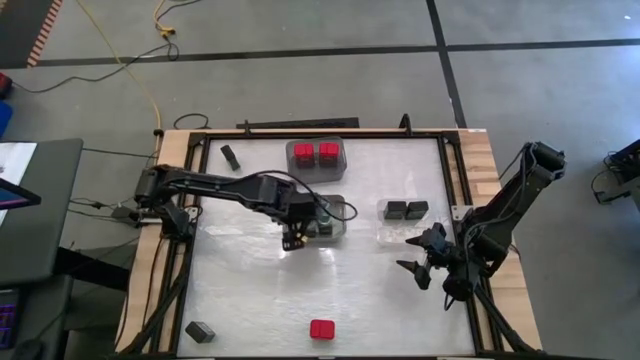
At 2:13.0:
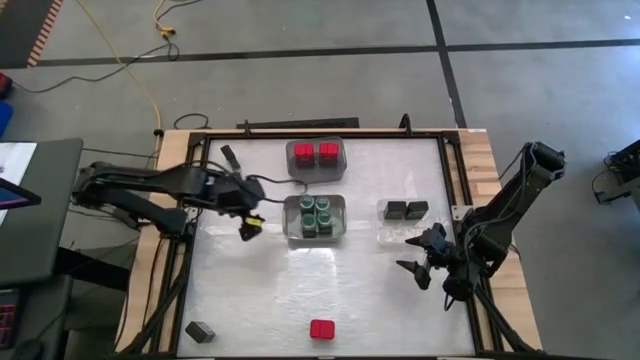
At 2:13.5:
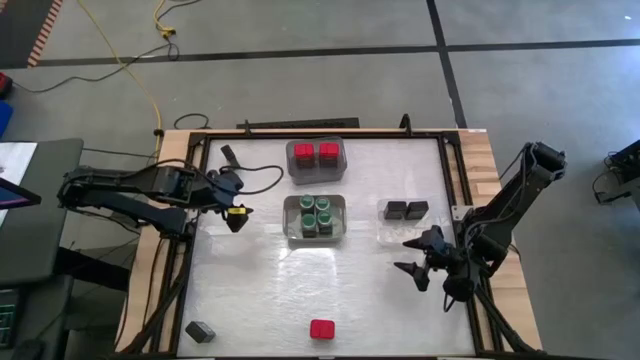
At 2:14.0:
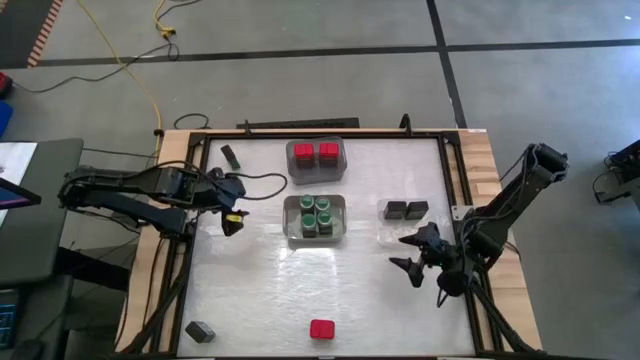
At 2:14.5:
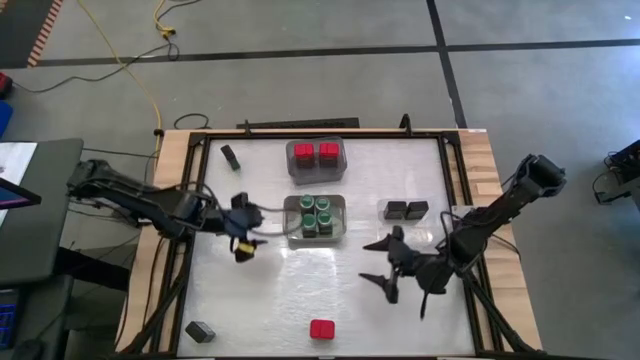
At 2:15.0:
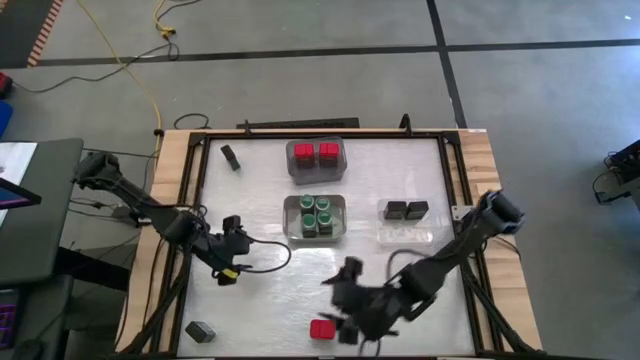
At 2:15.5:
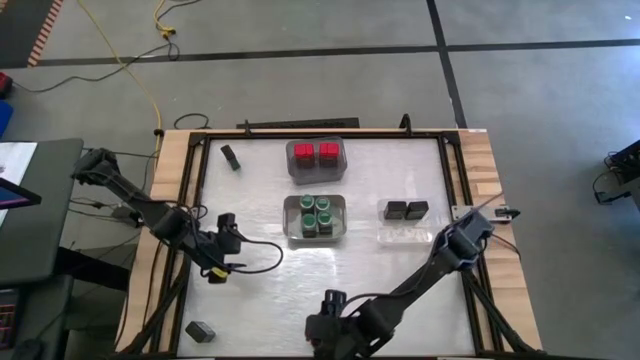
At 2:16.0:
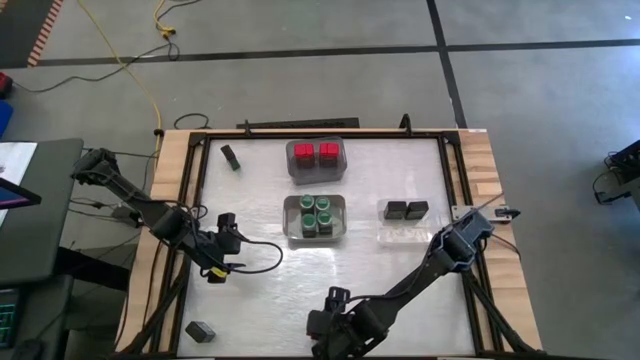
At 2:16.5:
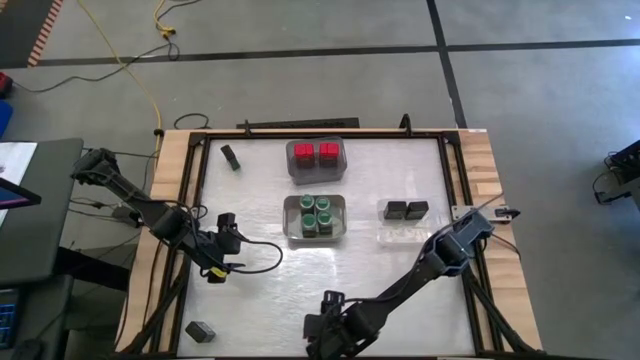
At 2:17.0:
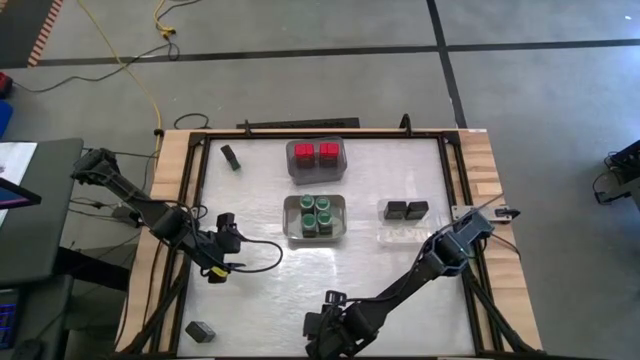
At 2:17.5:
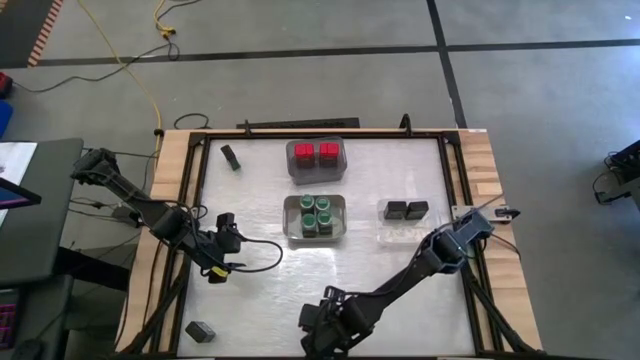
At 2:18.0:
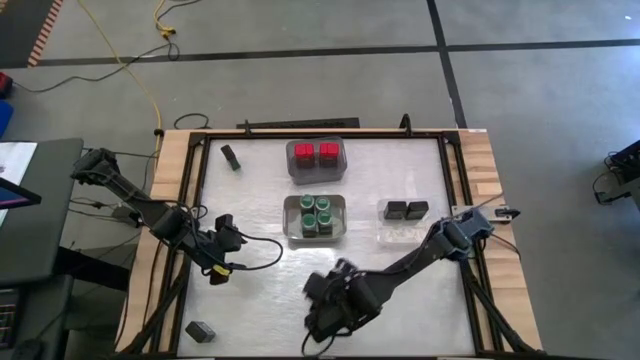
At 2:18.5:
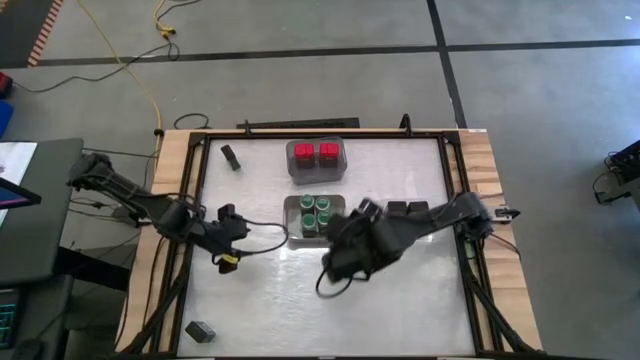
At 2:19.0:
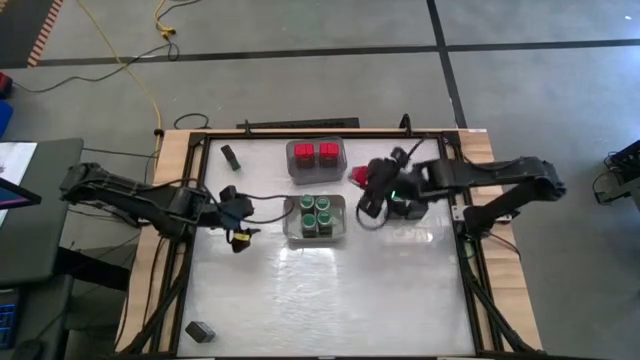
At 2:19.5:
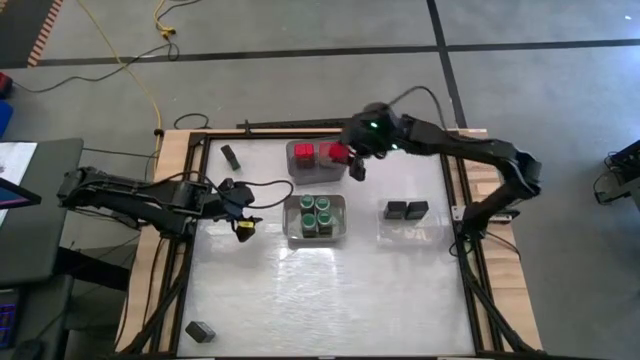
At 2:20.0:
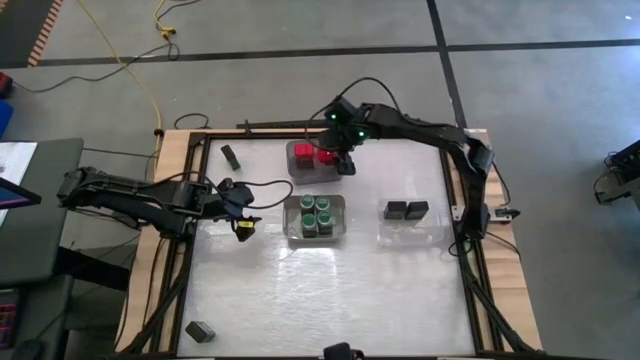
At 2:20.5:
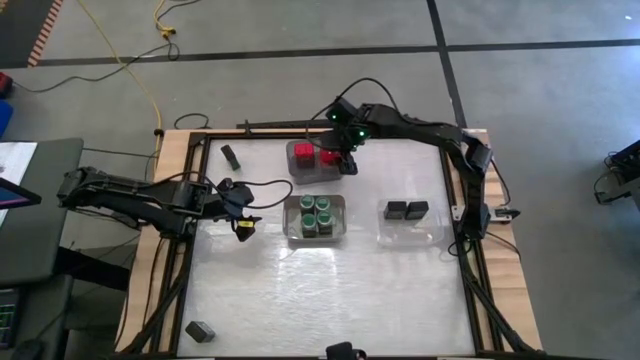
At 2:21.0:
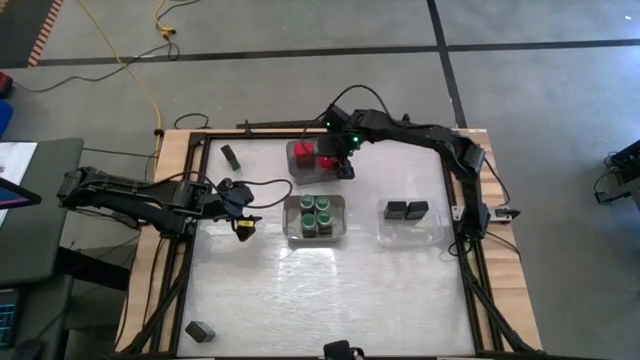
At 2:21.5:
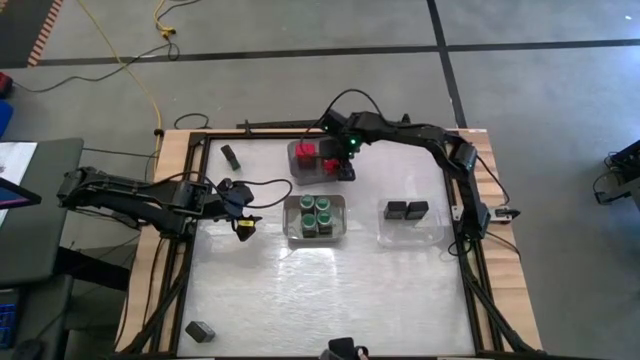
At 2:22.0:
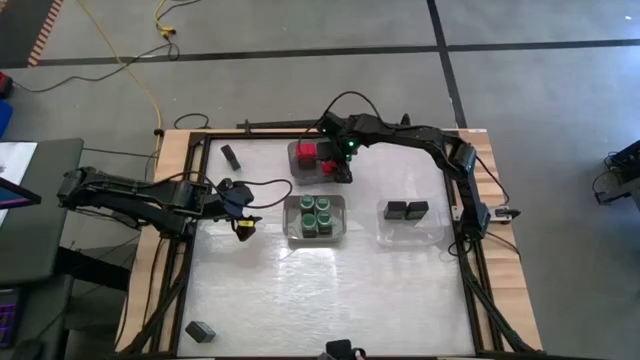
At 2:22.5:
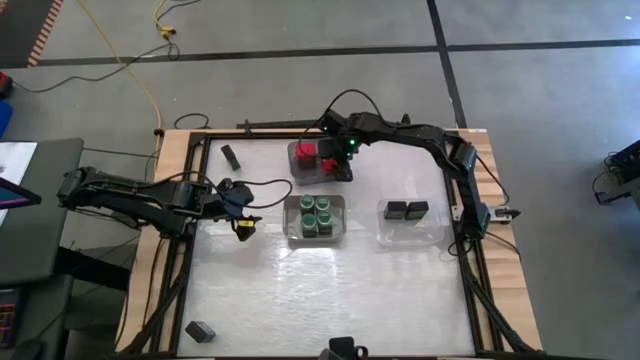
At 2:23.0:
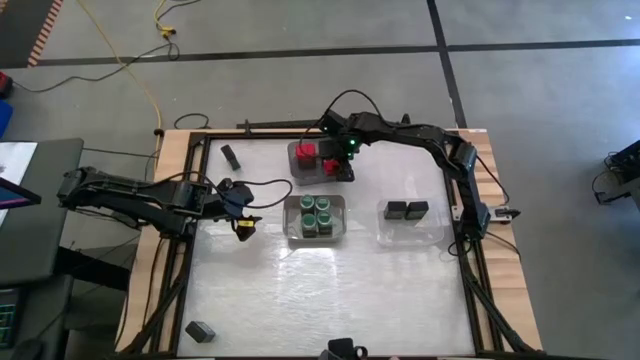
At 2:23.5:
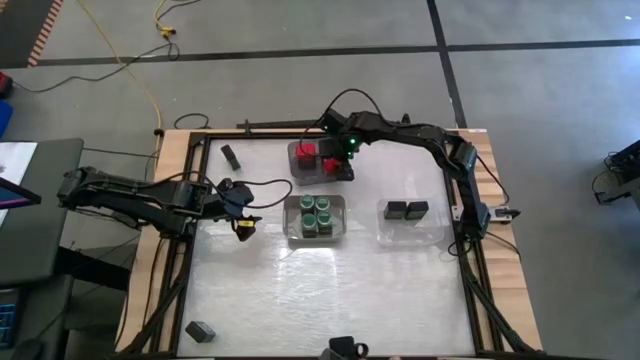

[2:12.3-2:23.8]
Task: Sort spices by type
Put the red spice can into the black bin

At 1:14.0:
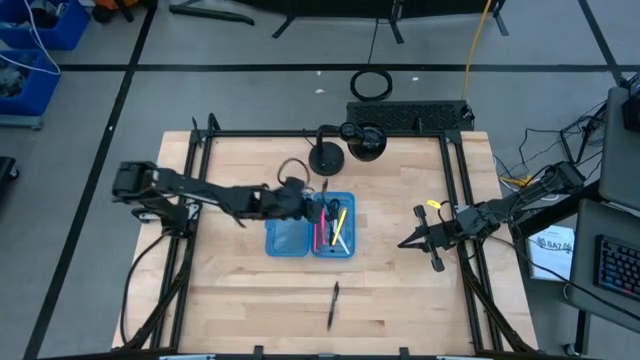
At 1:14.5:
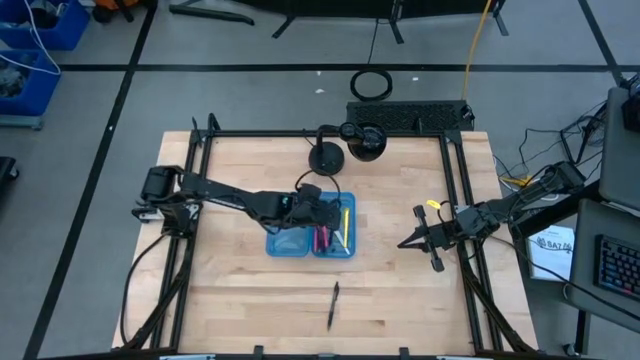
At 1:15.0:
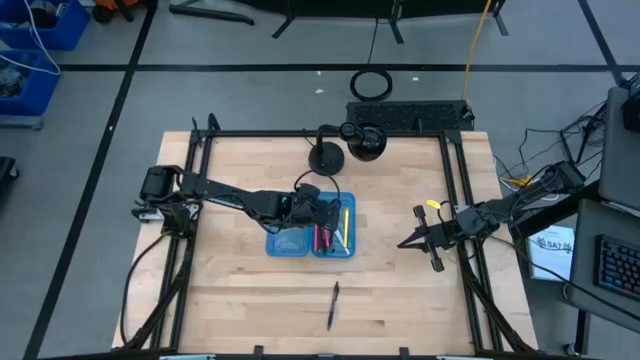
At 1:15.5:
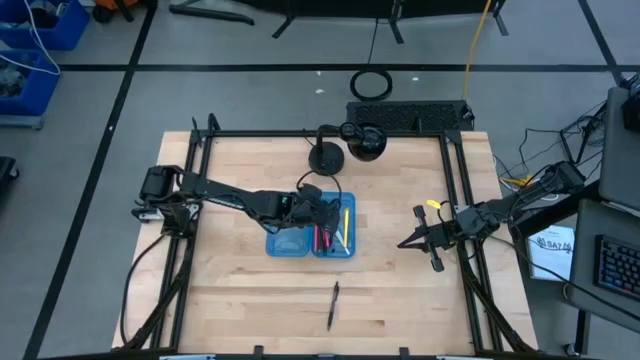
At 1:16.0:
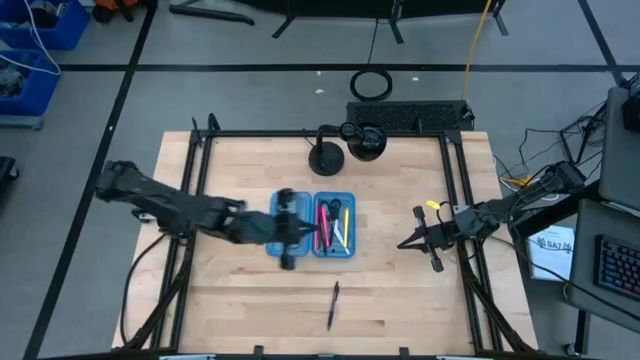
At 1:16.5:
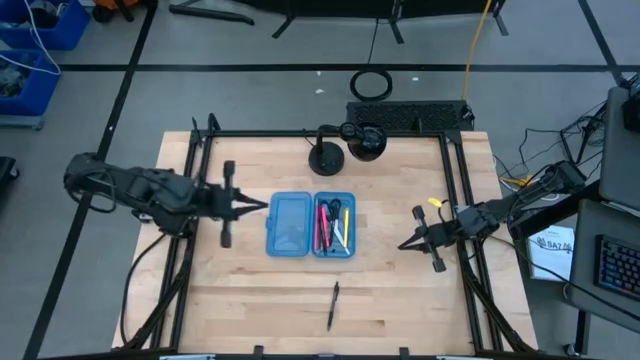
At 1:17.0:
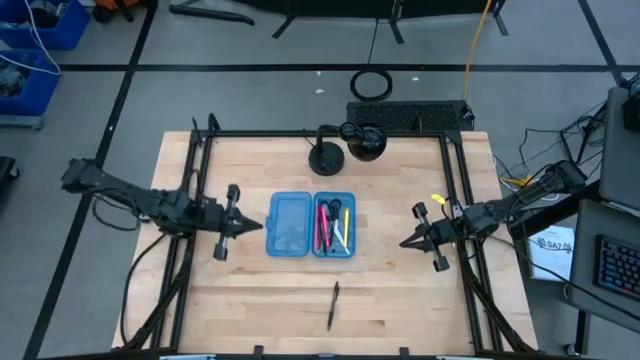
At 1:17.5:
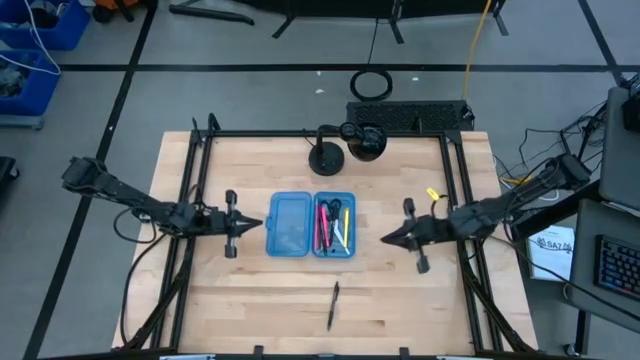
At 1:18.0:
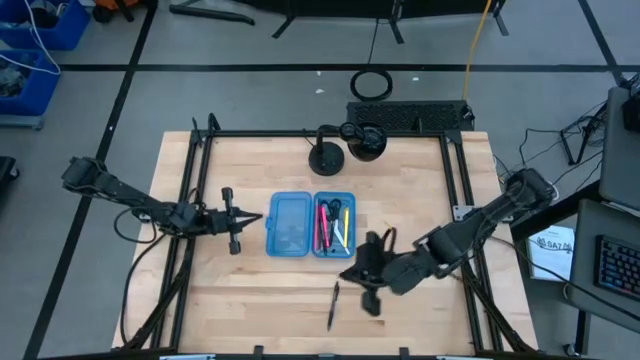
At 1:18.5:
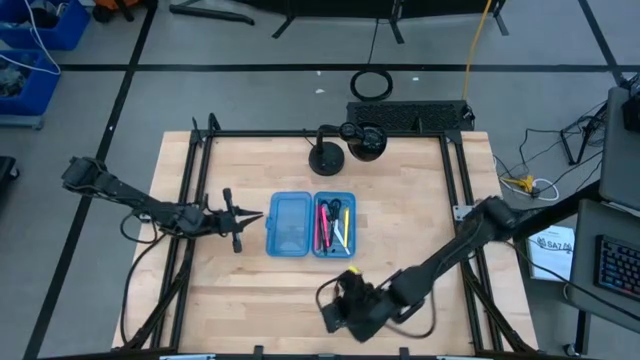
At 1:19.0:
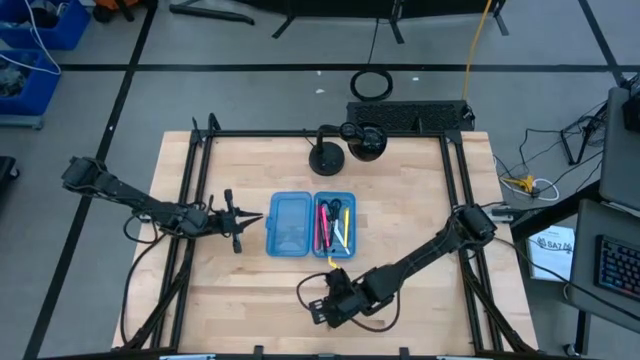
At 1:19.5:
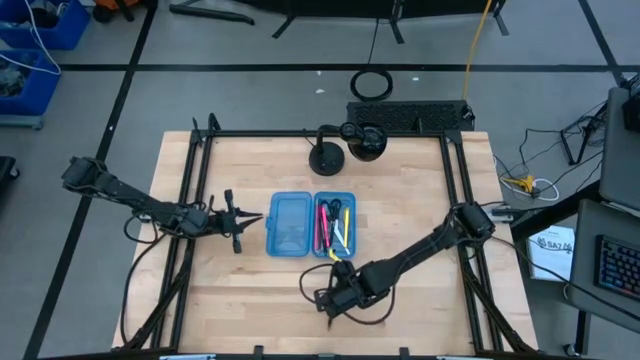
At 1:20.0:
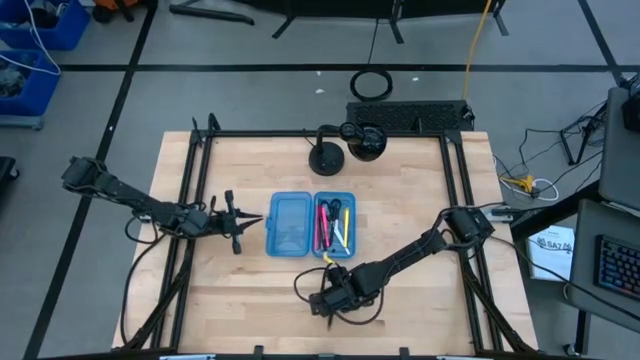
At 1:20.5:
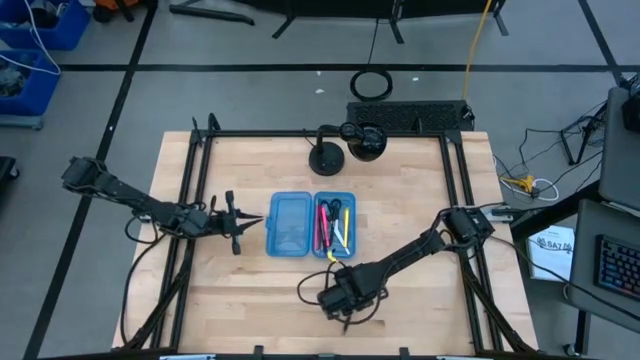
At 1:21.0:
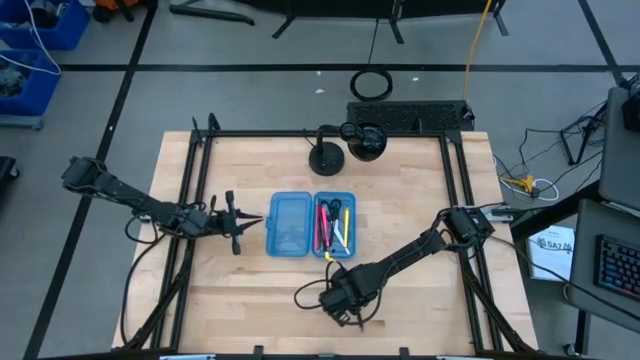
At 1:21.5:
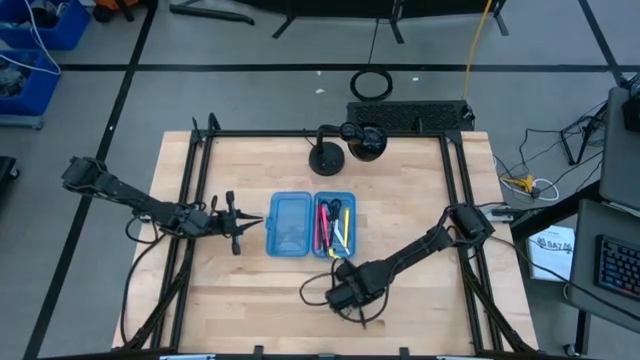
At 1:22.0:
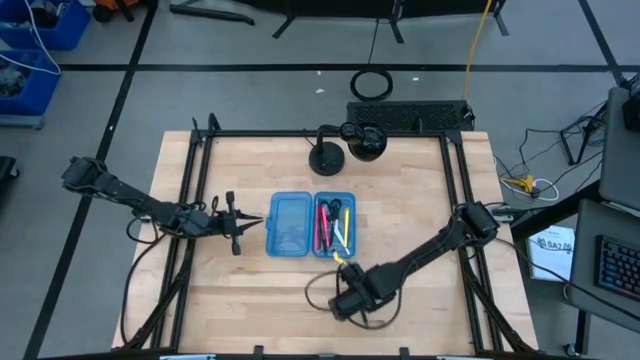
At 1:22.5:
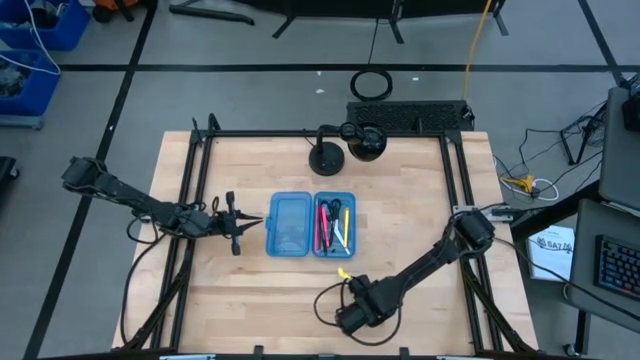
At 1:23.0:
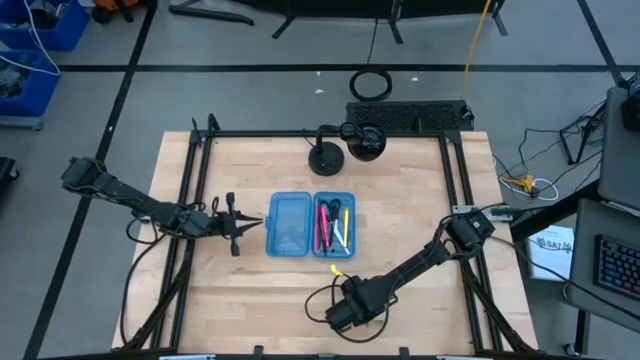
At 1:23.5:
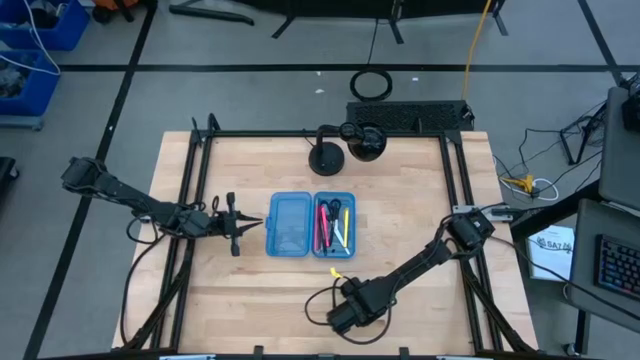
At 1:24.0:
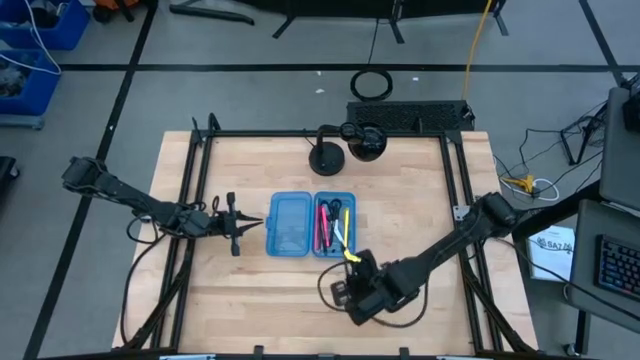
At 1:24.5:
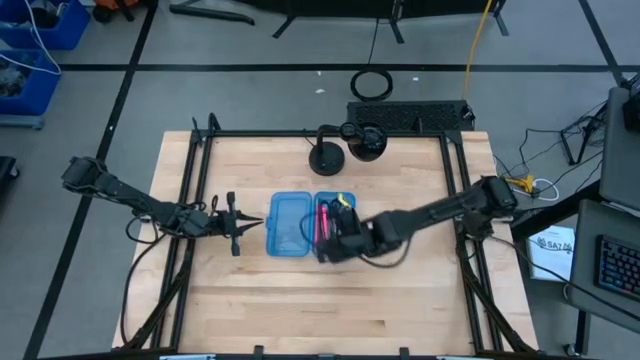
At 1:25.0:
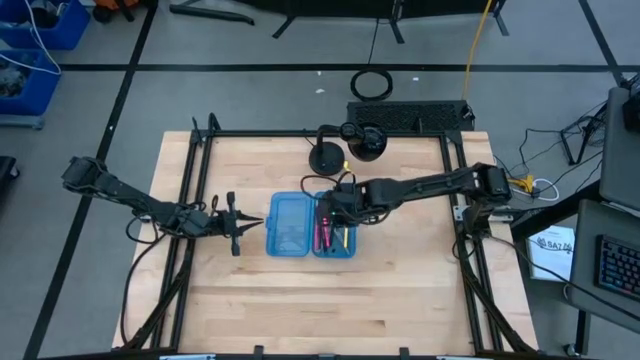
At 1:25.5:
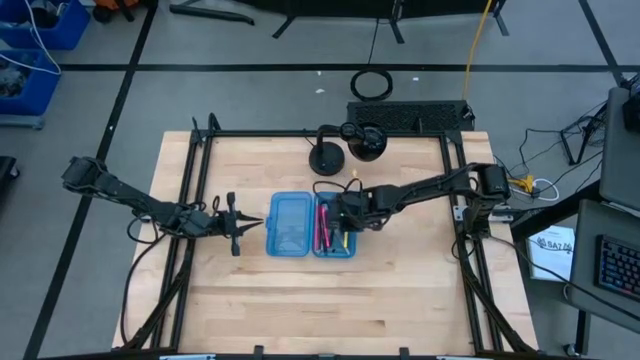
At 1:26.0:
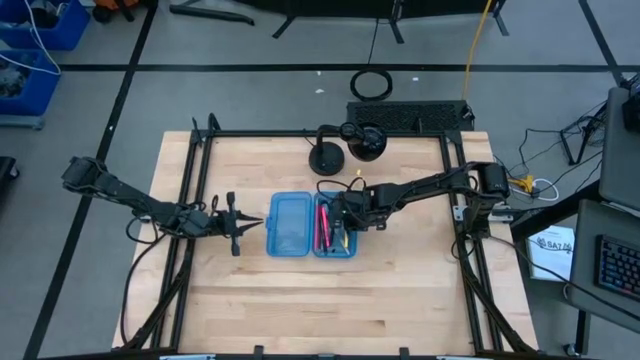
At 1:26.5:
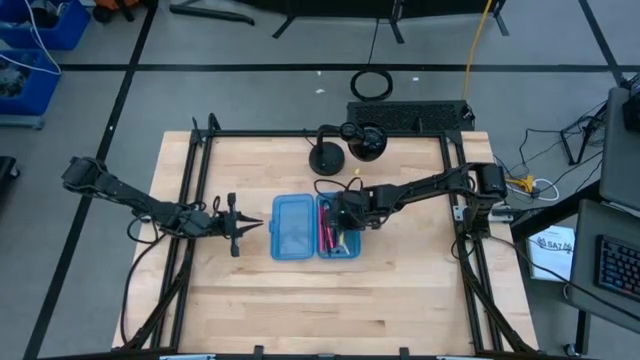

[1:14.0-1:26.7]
Task: Pick & place school supplies into a supply box
Put the black pen into the blue supply box
